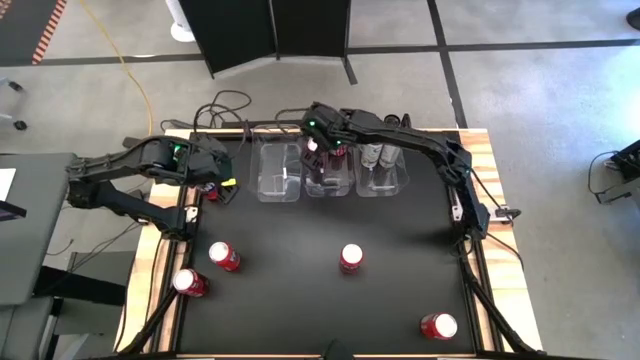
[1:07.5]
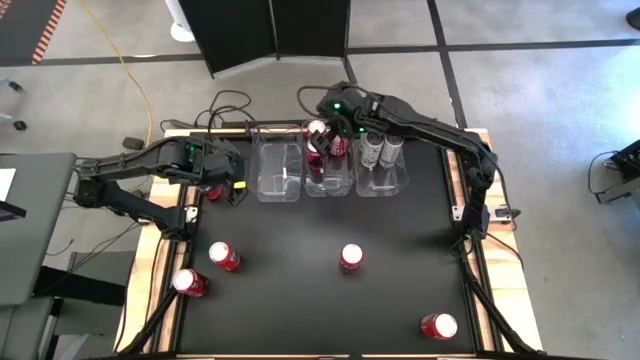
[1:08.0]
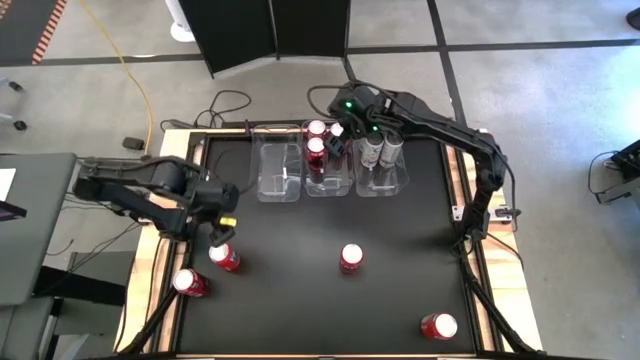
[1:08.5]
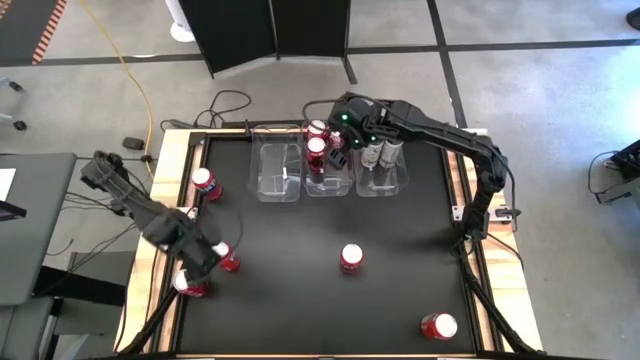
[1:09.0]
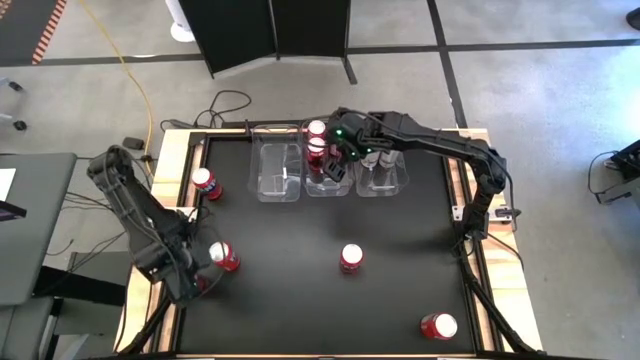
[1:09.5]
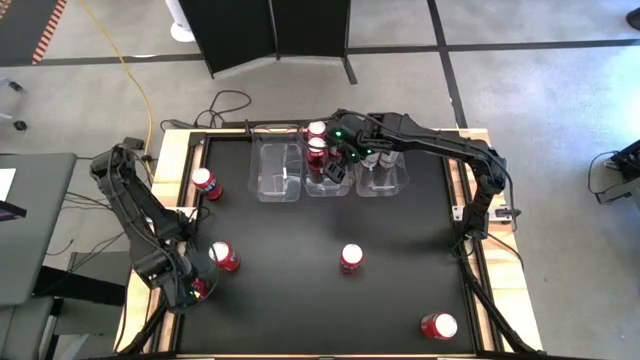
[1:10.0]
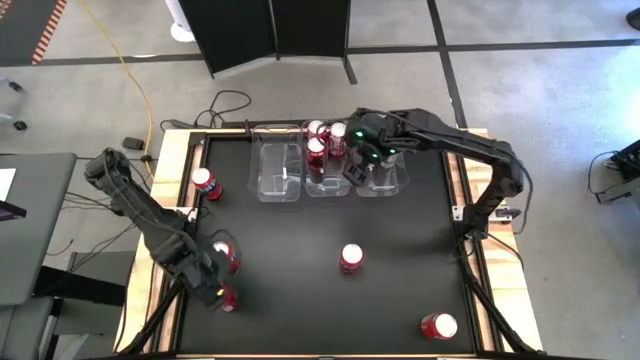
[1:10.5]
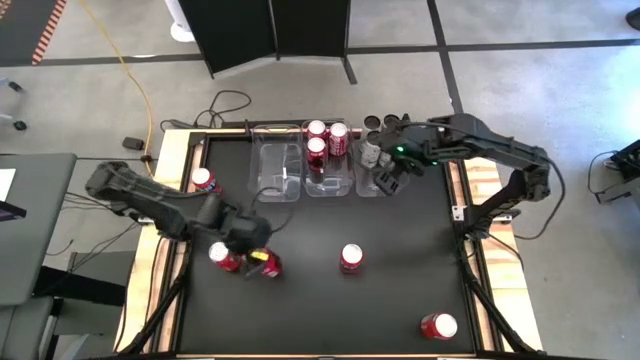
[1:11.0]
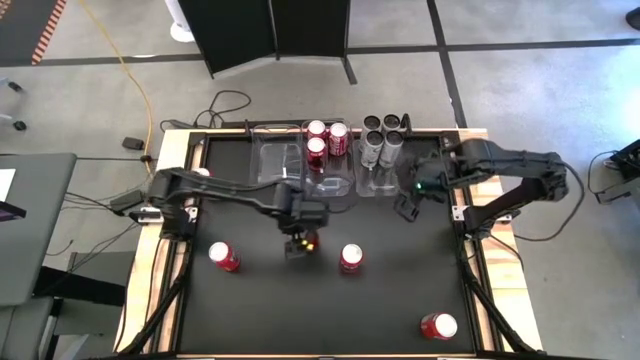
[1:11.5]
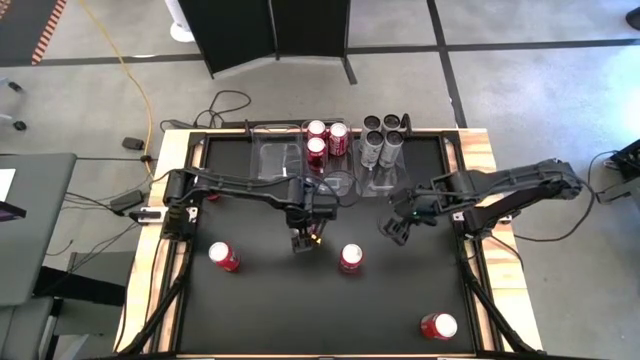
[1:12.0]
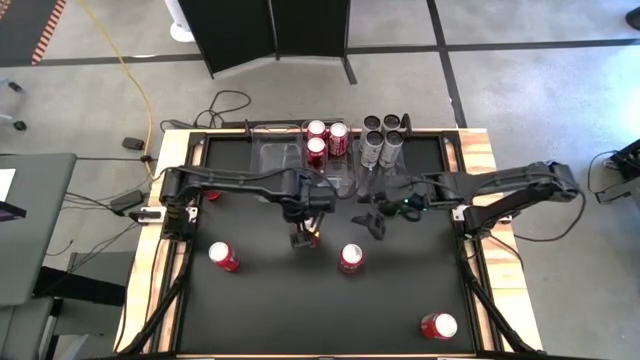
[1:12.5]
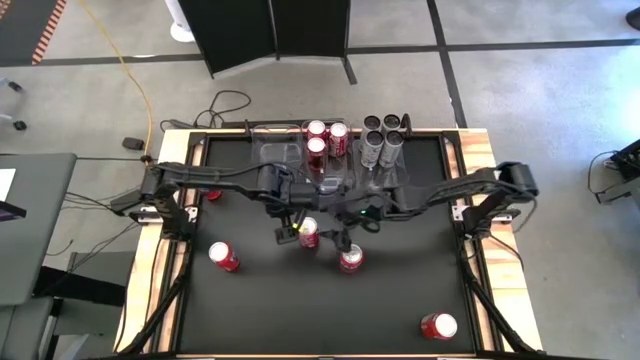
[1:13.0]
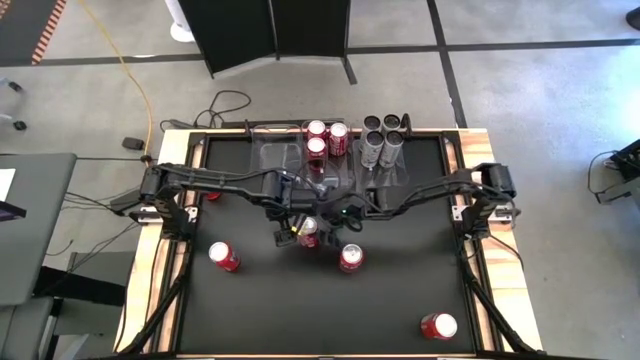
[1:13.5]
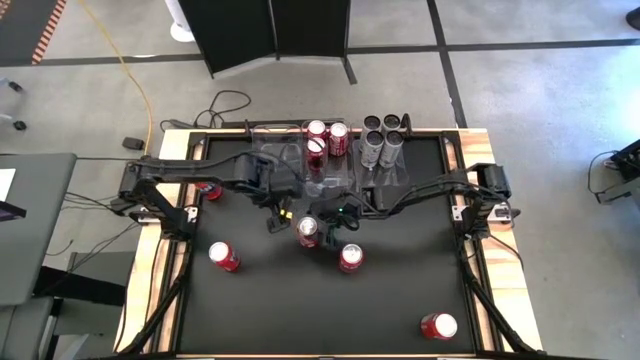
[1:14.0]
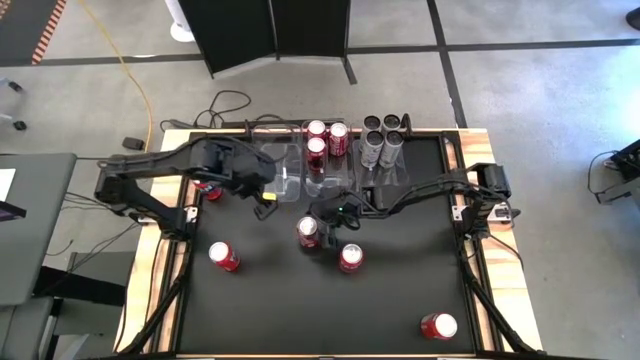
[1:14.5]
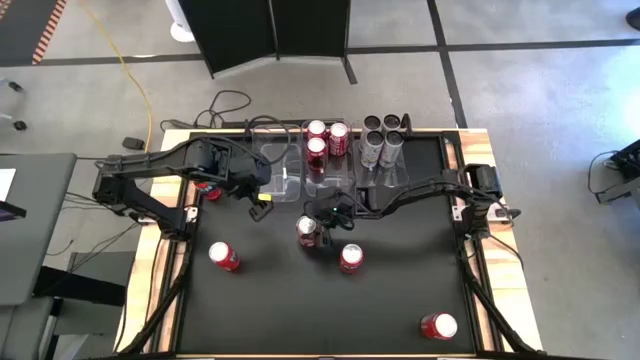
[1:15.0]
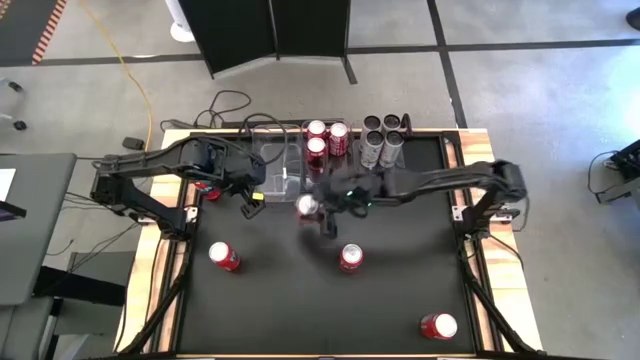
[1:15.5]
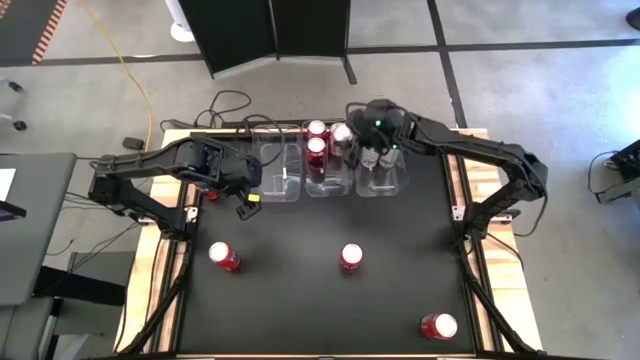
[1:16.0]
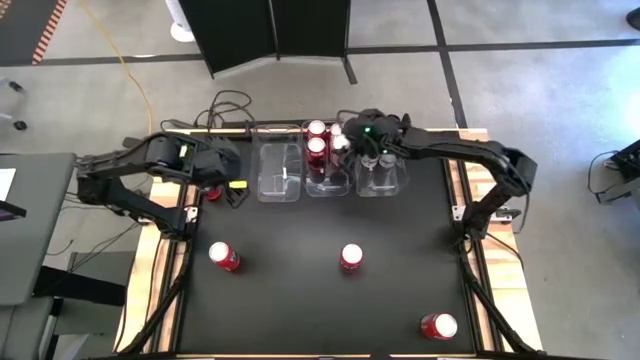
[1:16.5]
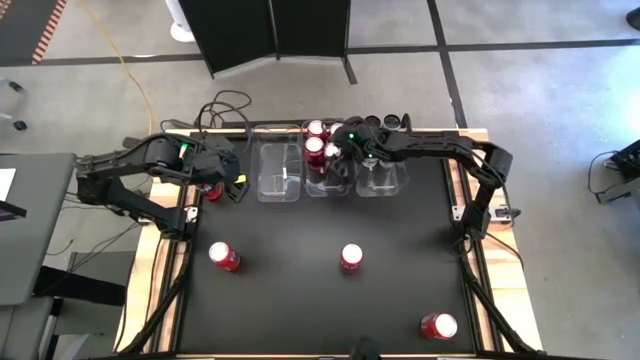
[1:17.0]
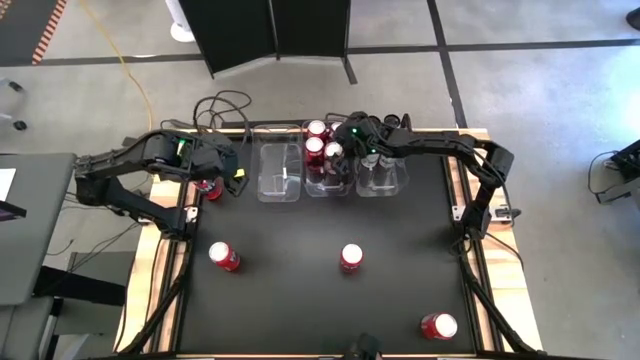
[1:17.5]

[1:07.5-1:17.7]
Task: Sort soda cans
Put the red-white soda can into the center transparent bin

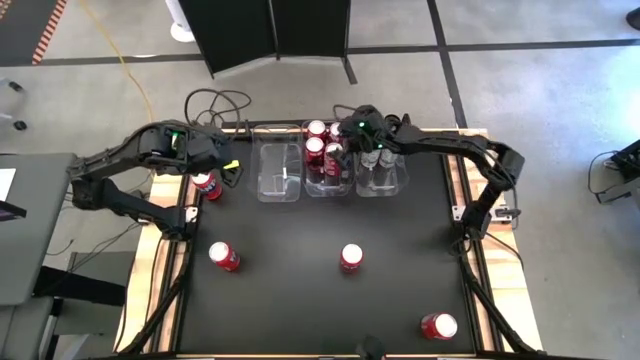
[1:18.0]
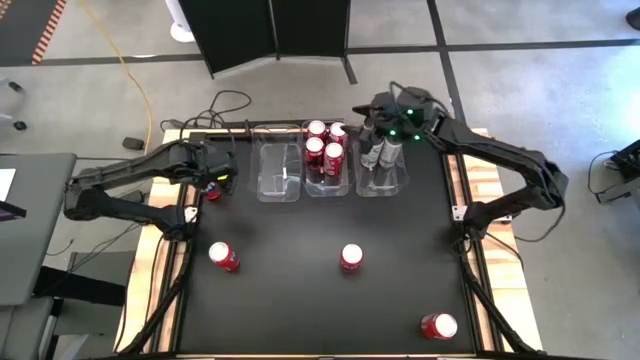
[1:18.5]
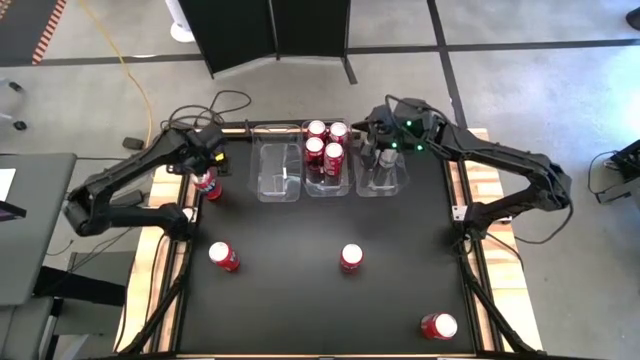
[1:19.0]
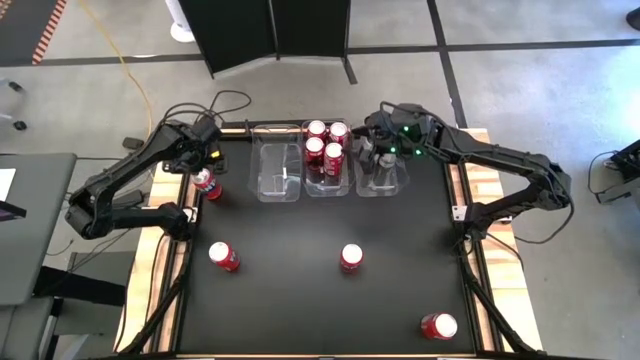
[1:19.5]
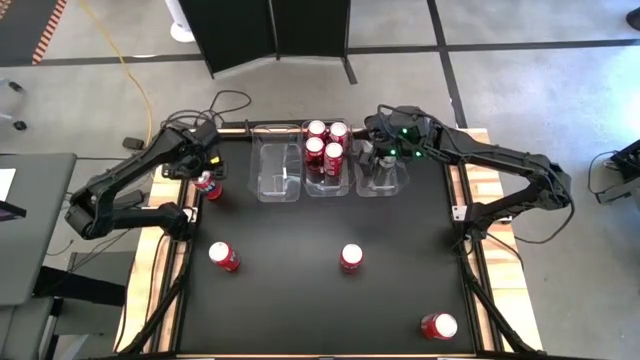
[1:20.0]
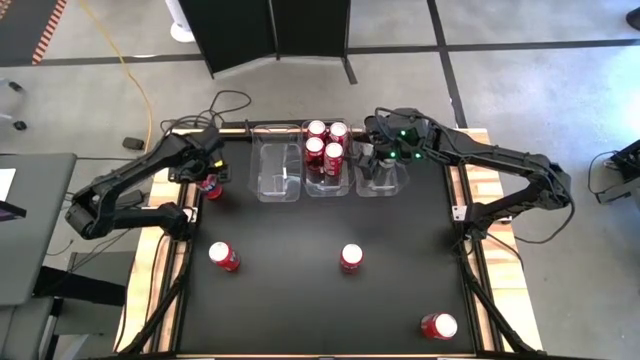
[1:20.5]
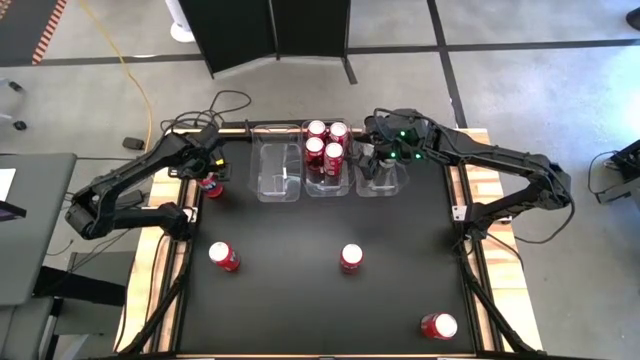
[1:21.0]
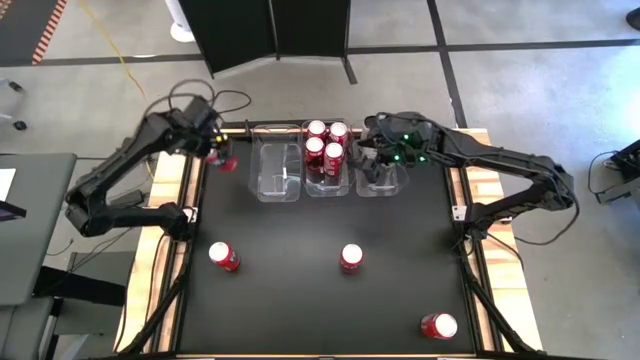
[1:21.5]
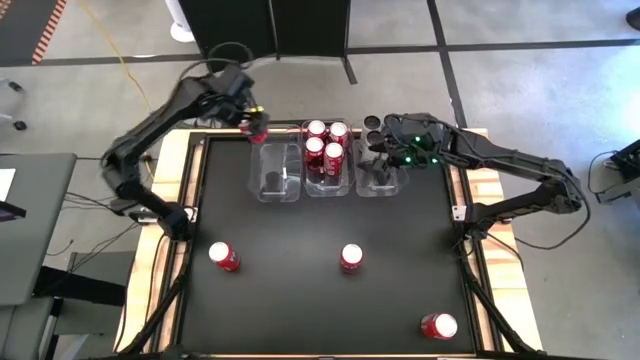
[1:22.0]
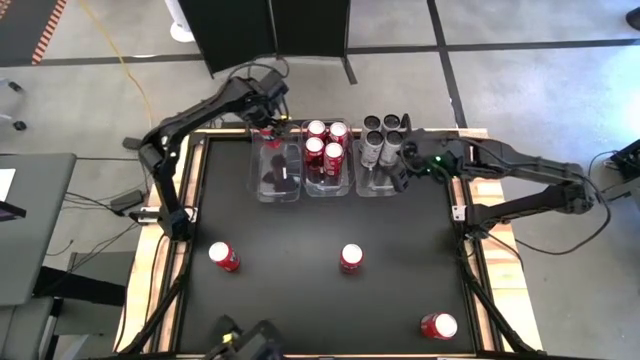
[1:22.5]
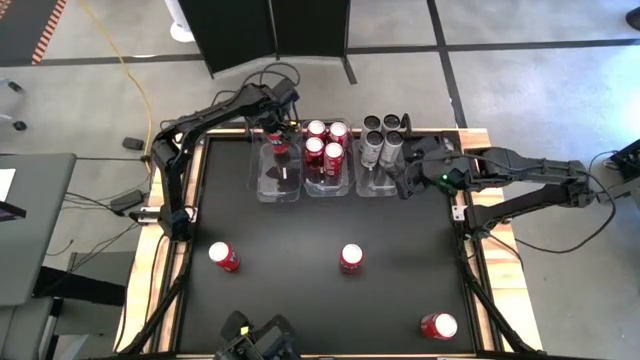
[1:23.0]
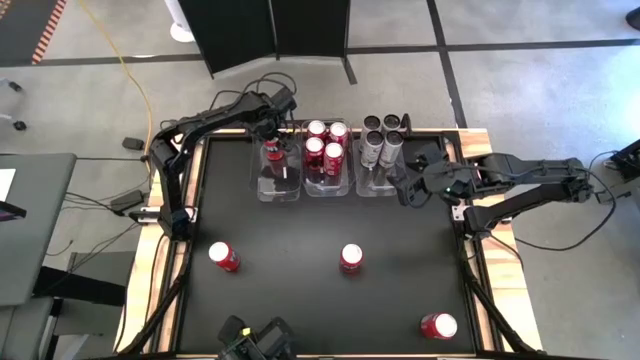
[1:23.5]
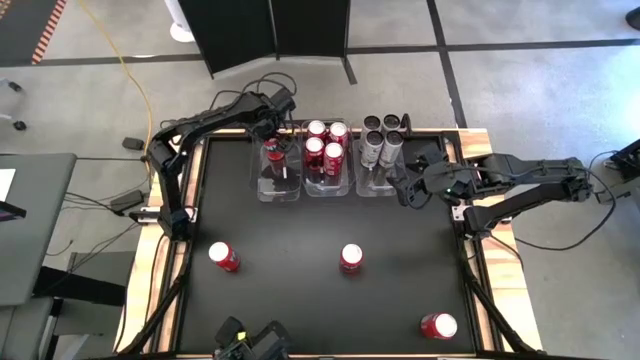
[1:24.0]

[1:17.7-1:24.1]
Put the top red soda can into the left transparent bin

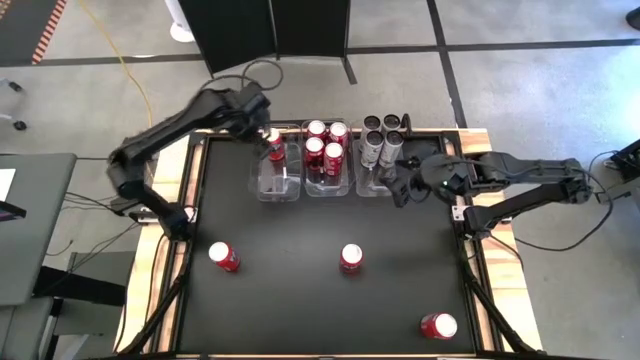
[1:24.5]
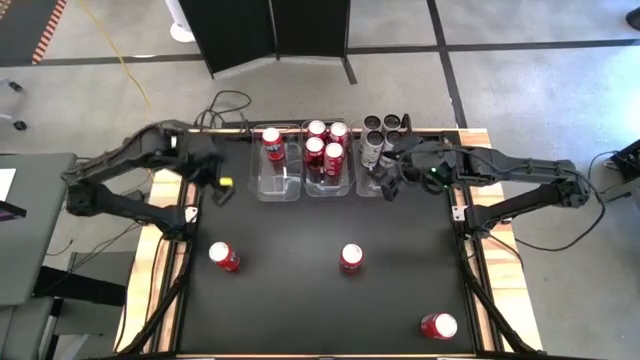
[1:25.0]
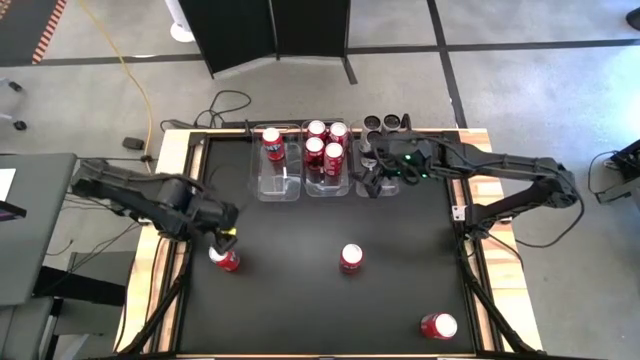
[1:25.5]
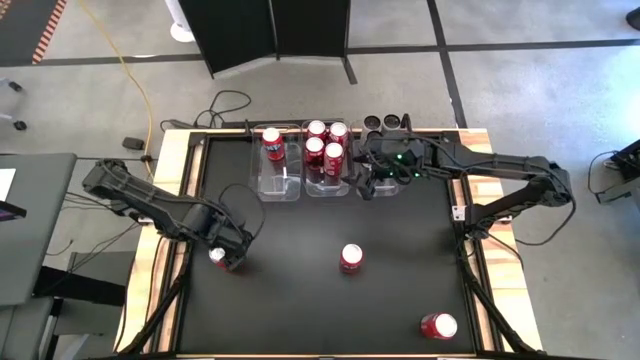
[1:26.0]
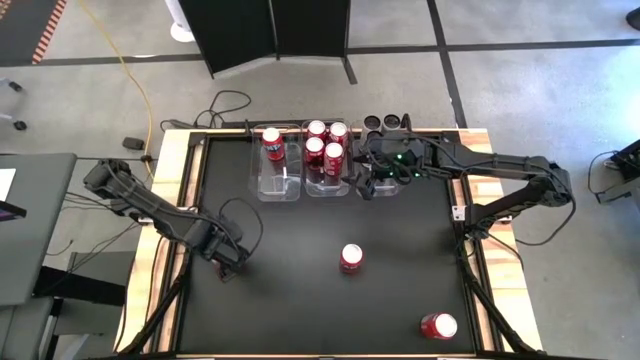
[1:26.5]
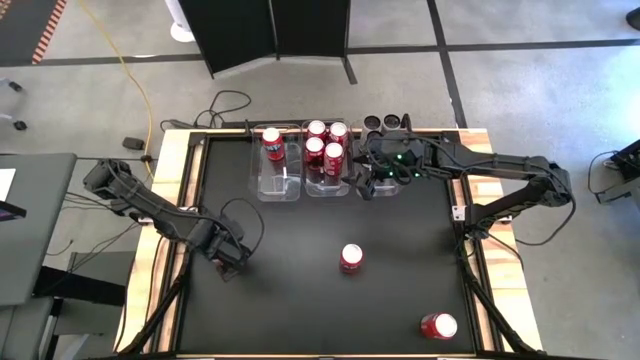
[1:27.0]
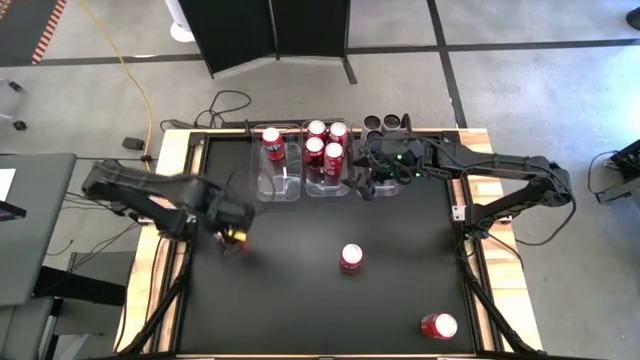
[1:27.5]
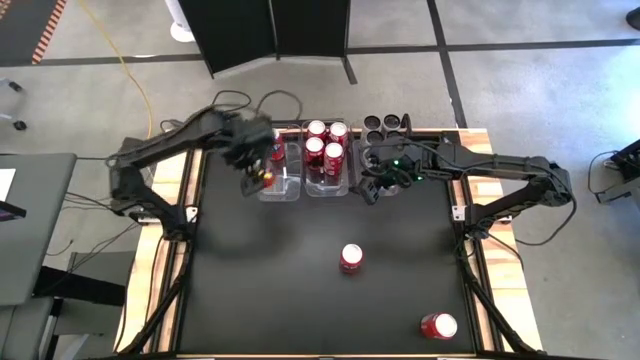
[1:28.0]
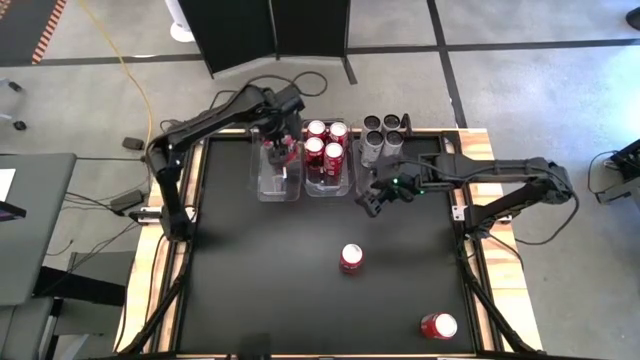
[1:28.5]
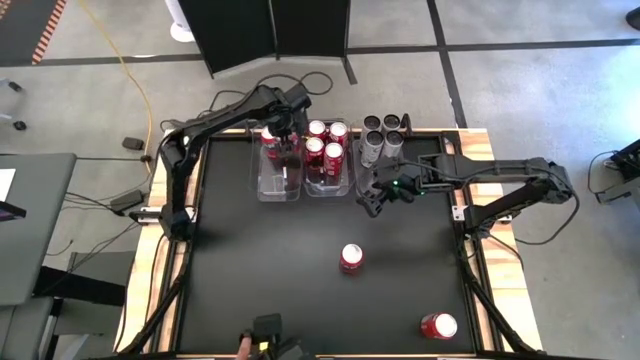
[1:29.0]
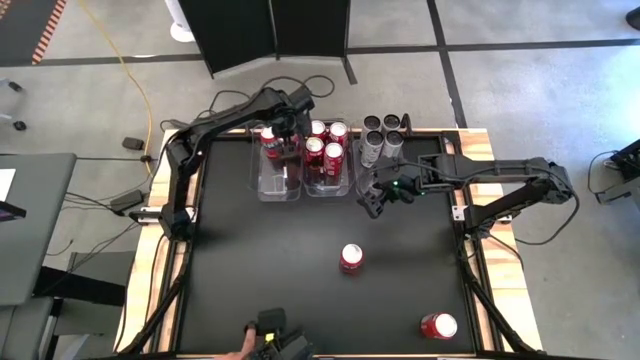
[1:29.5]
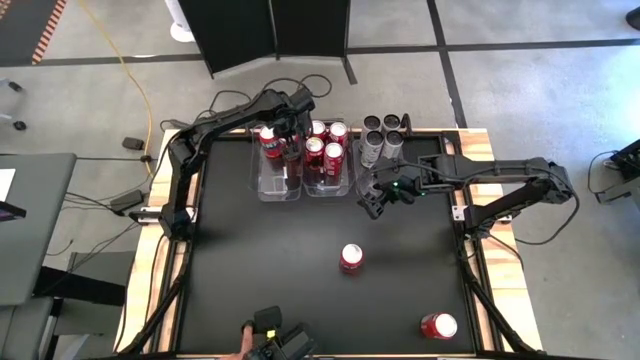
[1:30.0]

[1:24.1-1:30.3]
Put the top left red soda can into the left transparent bin
